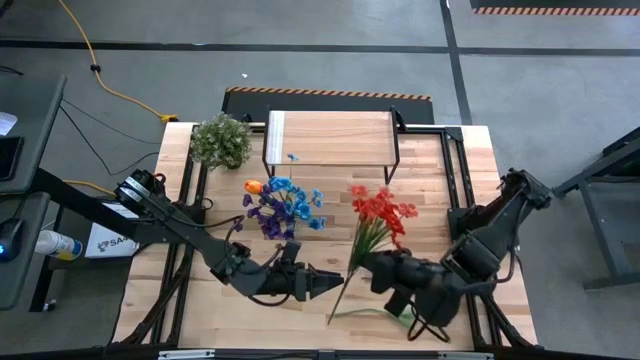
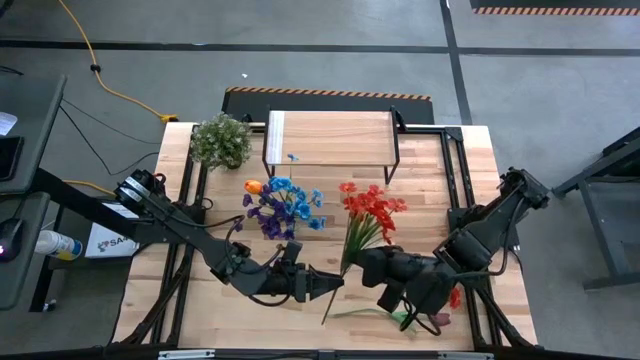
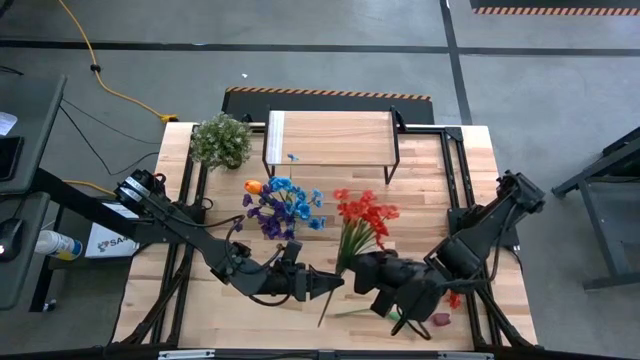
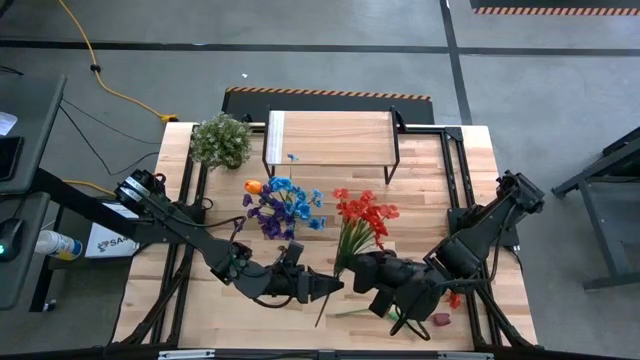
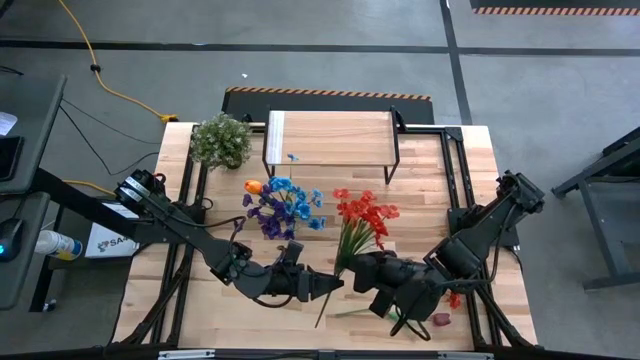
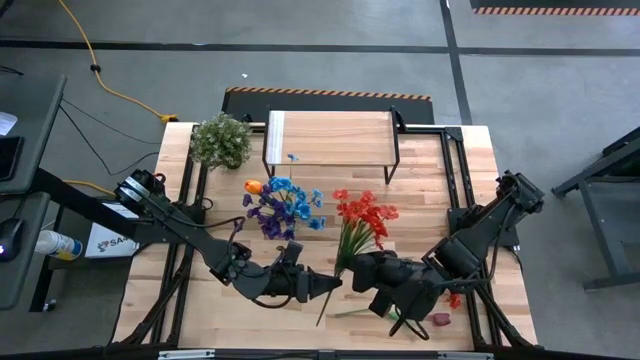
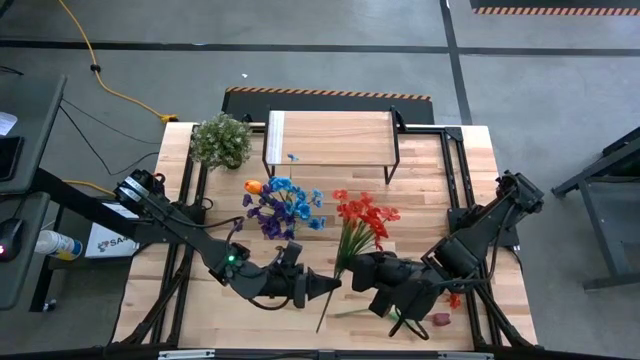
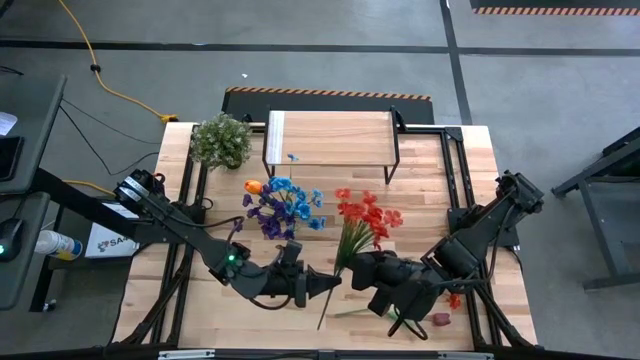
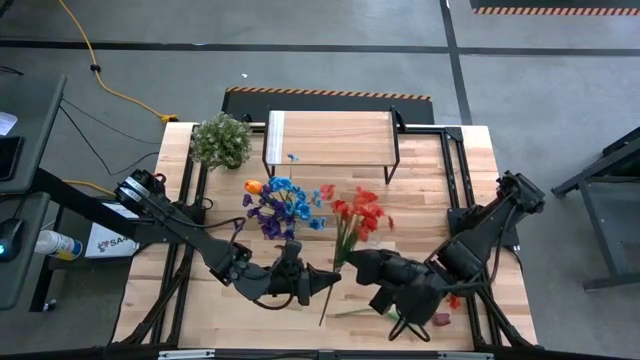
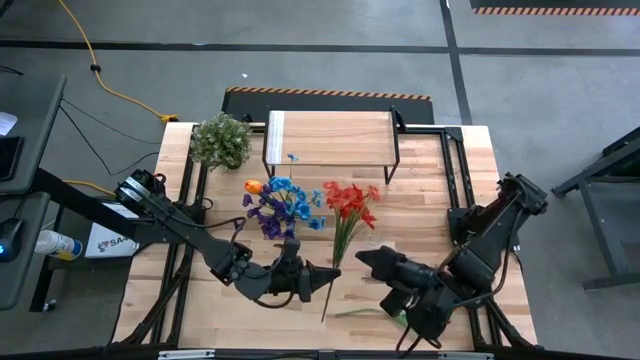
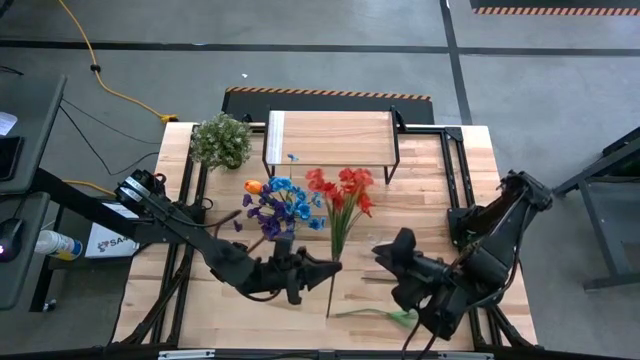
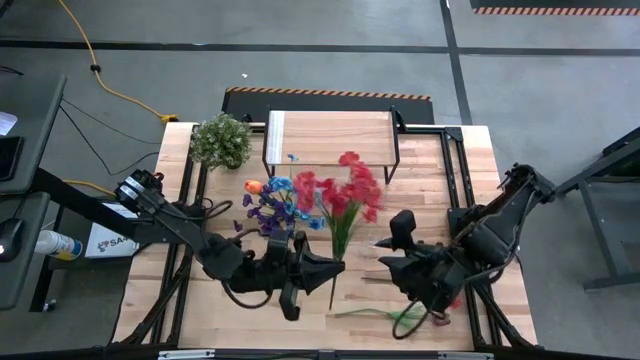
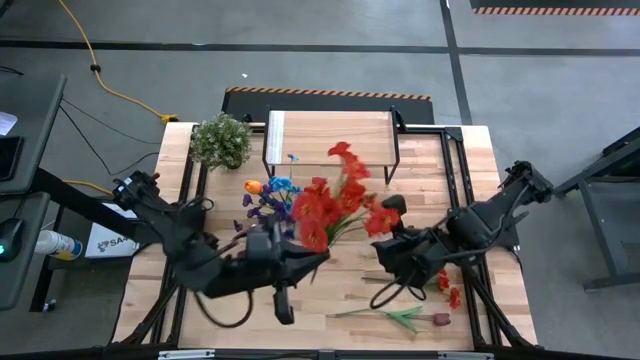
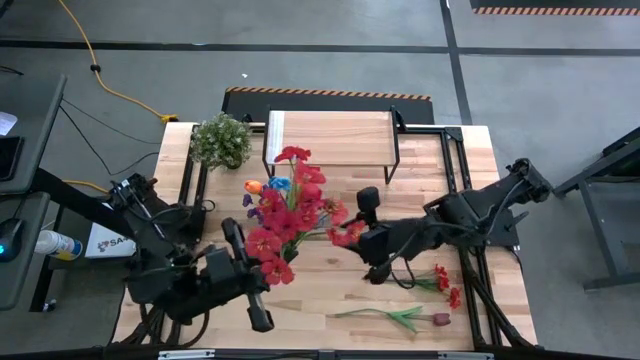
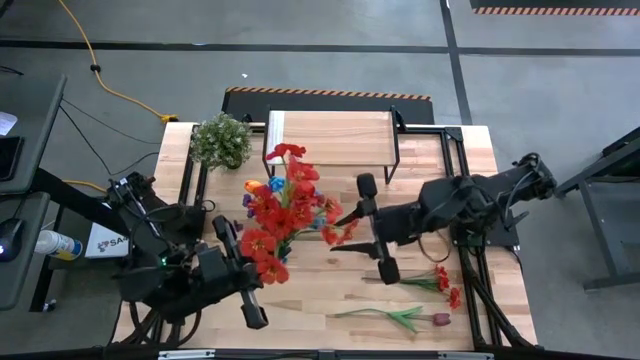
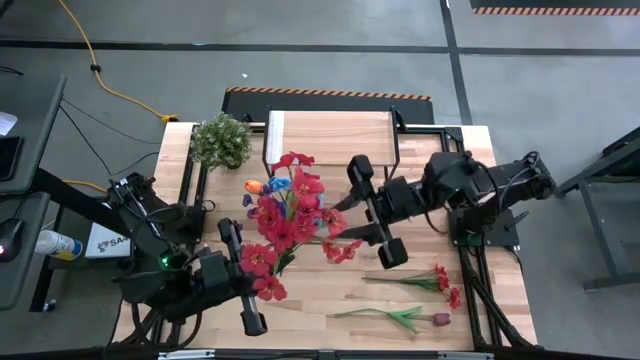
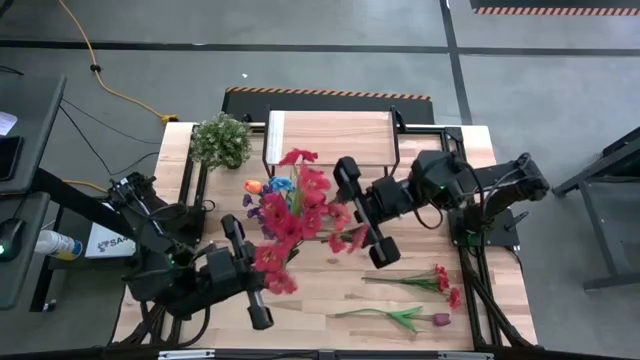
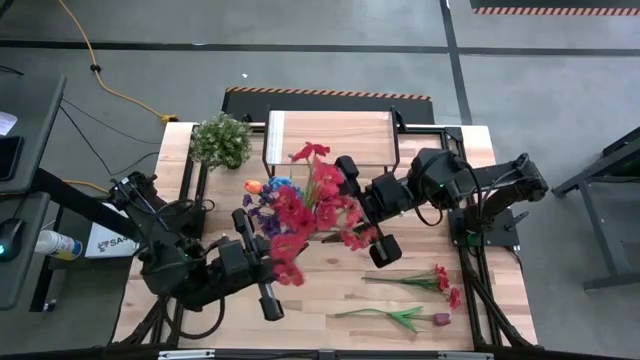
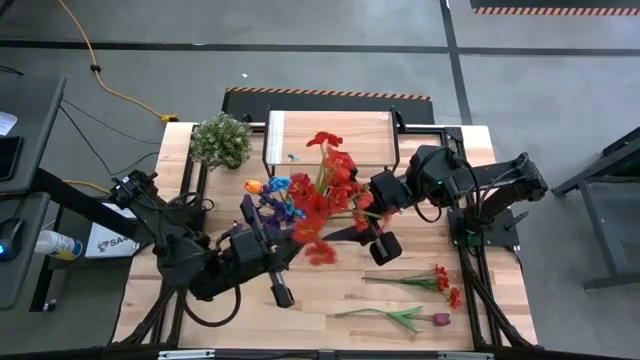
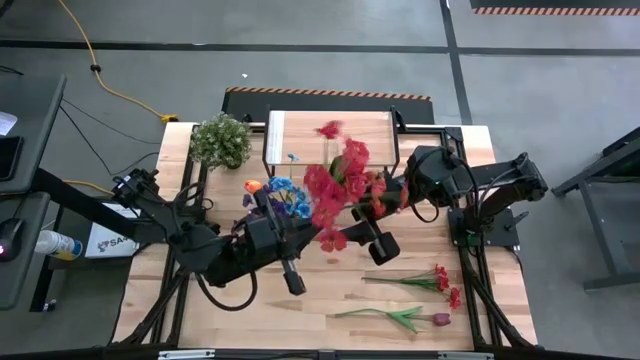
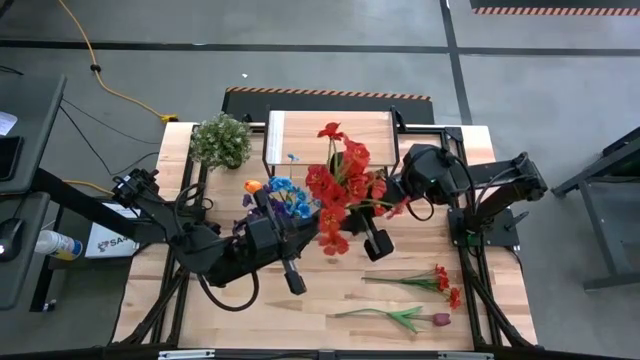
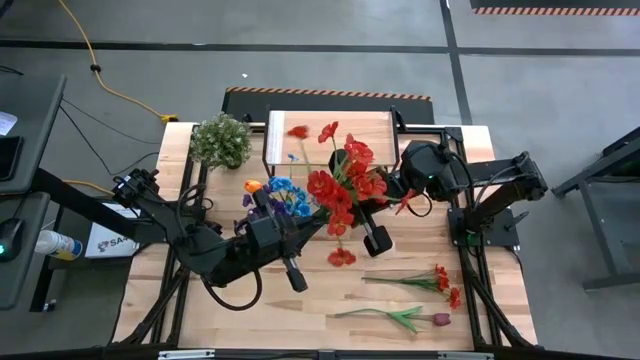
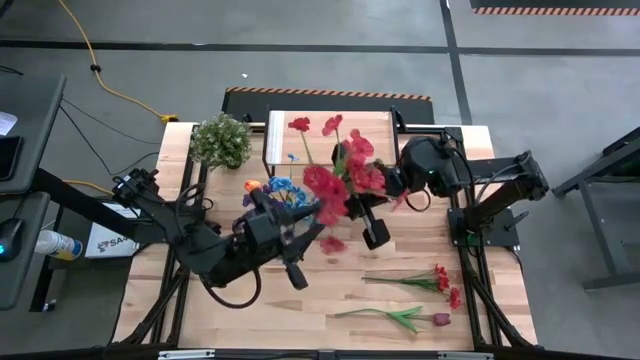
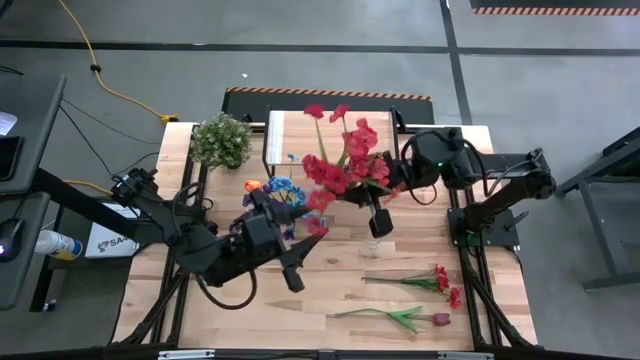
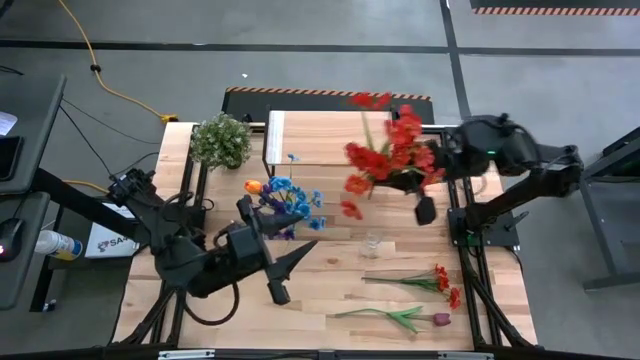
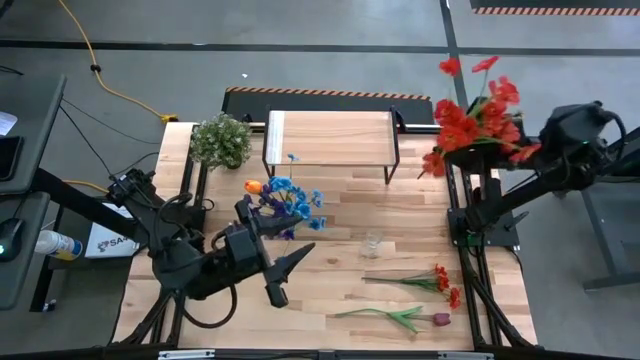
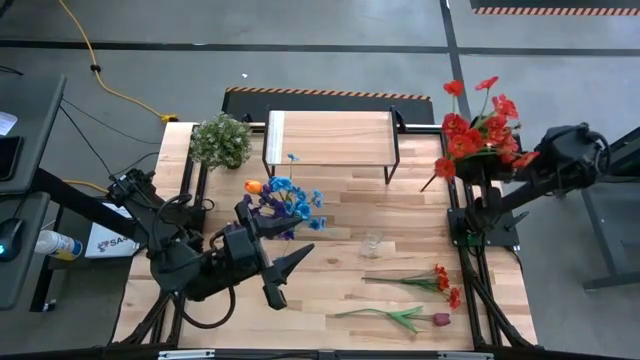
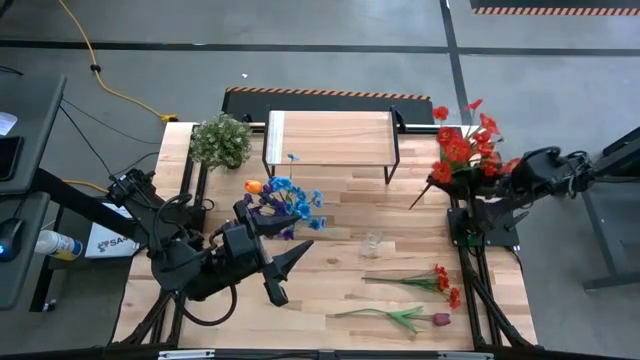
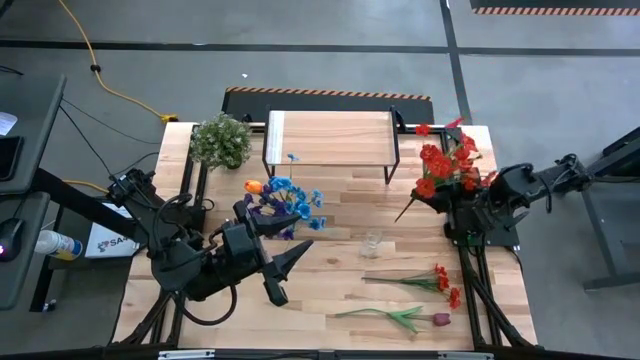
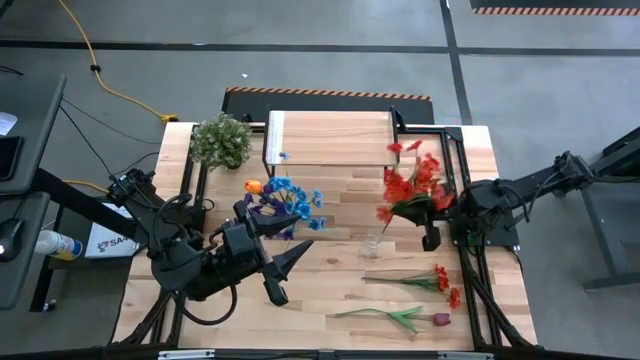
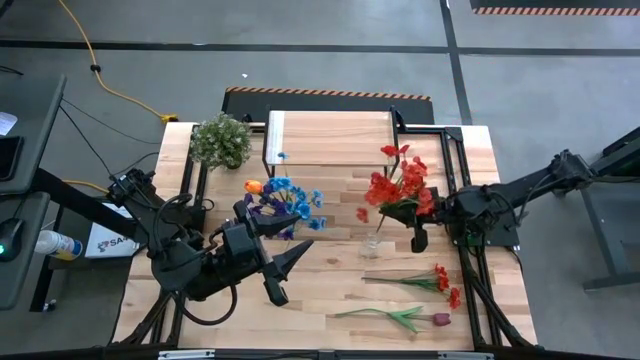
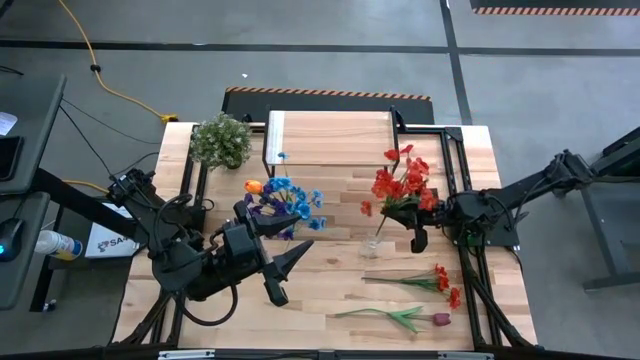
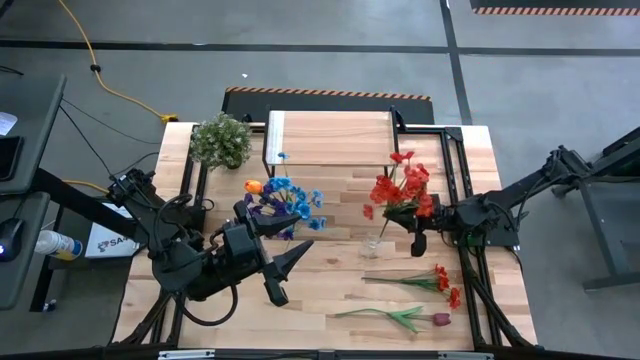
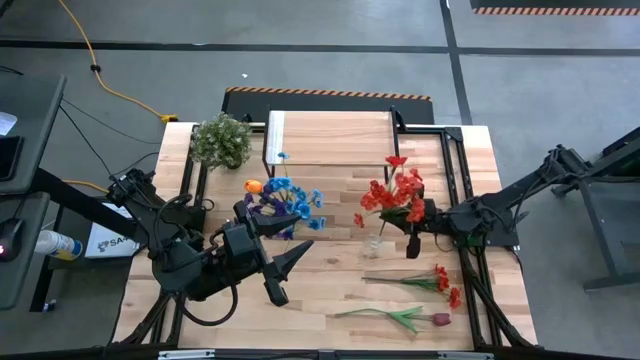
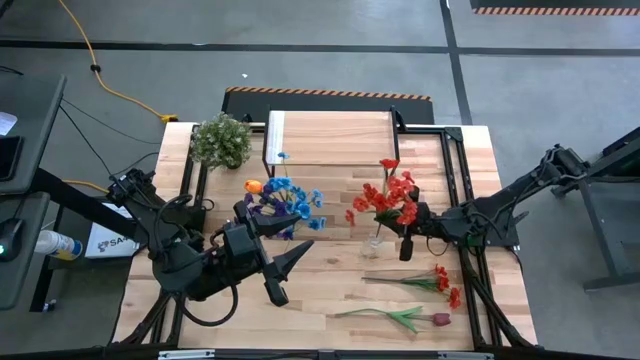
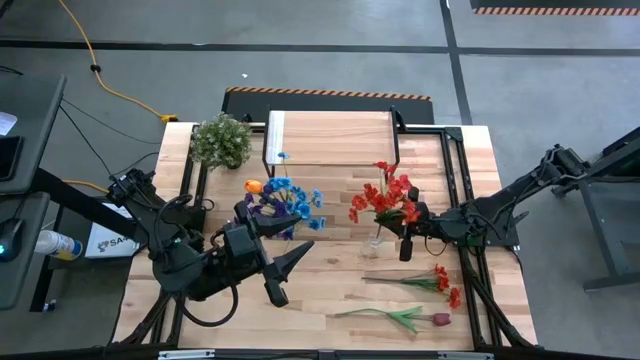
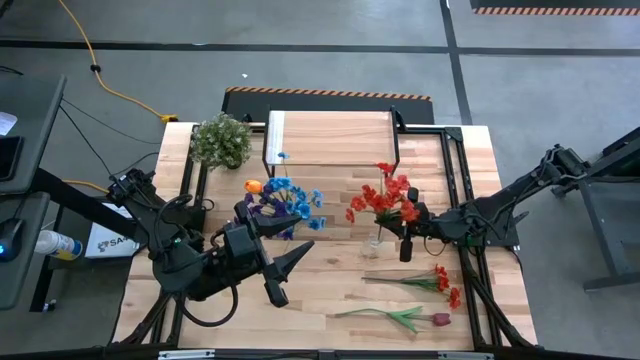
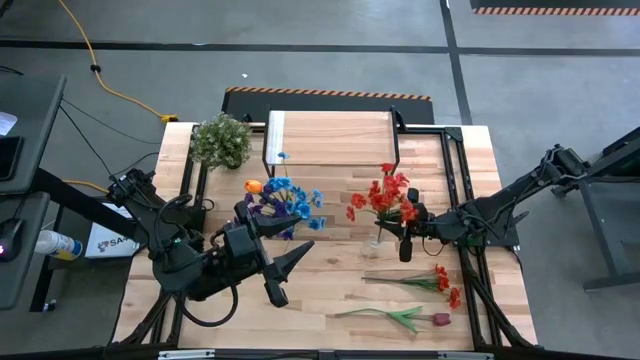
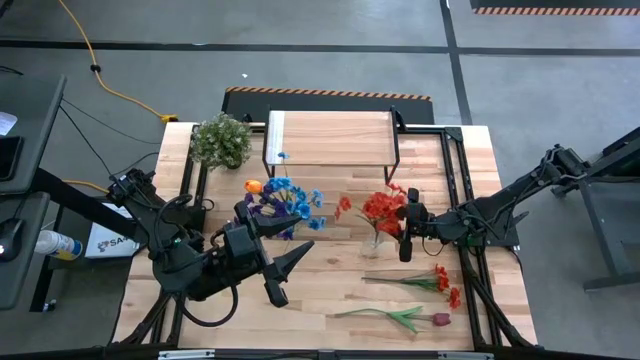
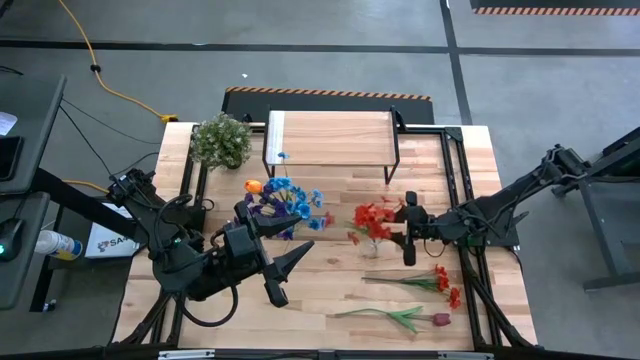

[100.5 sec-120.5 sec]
Task: Pick and place flowers into a vace then onto a shelf
Put the top red flowers into the right transparent vase

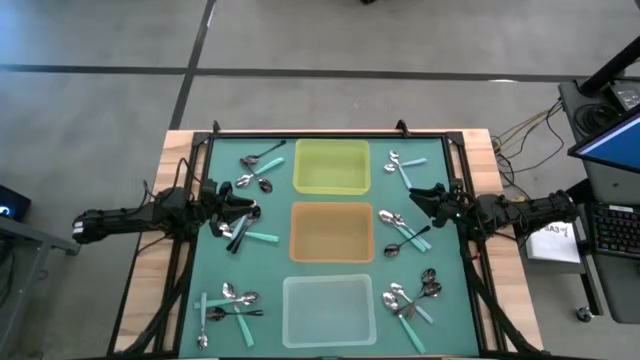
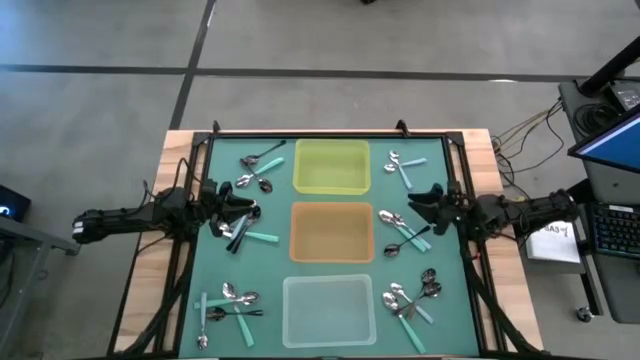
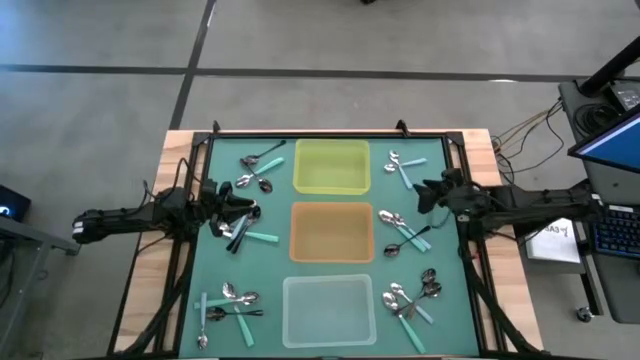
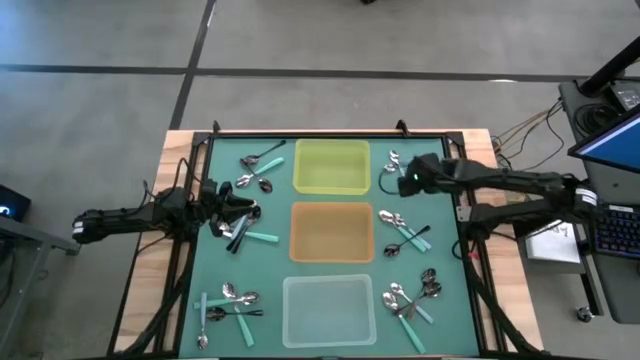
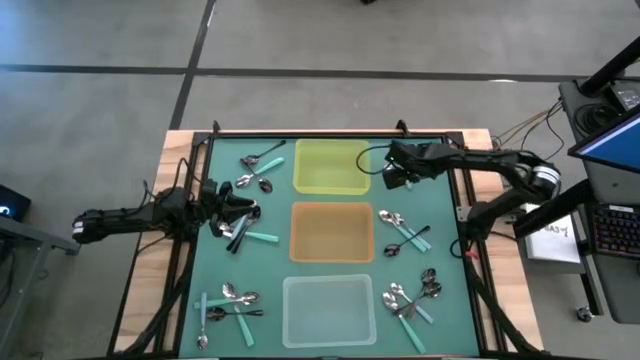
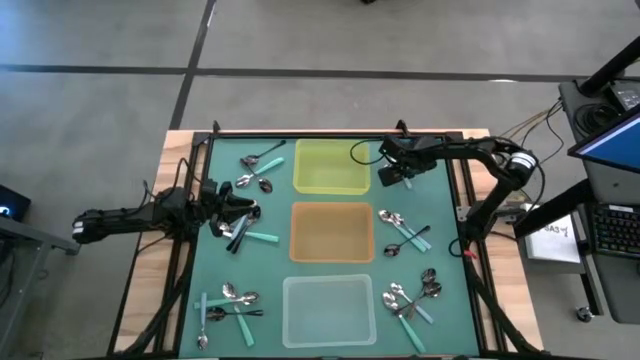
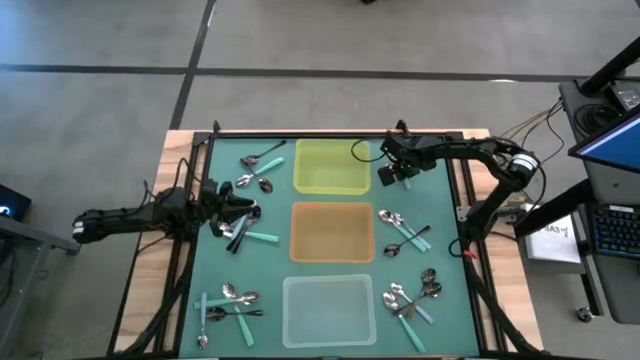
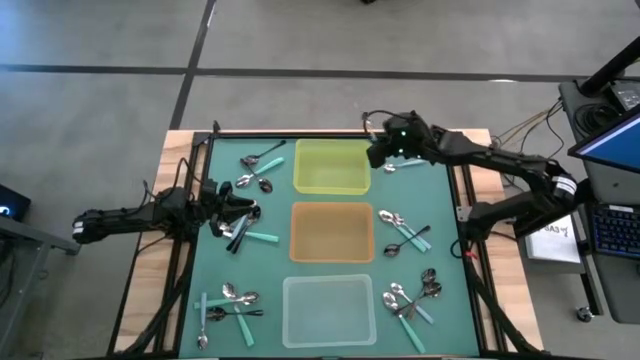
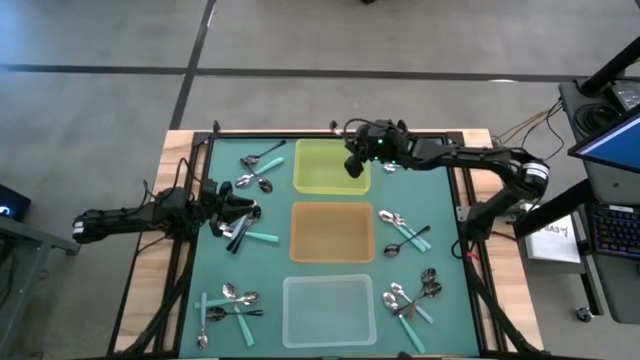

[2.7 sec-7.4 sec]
Task: Sort silverware by color (type)
Put the blue spoon into the yellow bin
